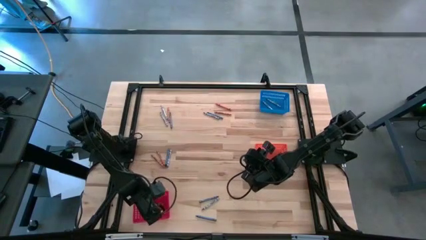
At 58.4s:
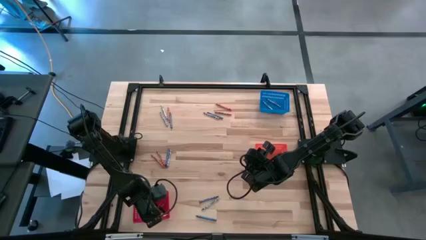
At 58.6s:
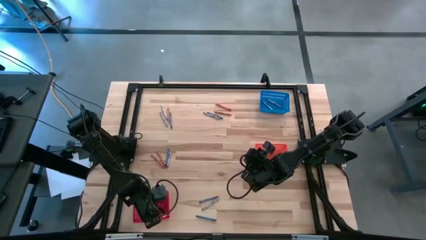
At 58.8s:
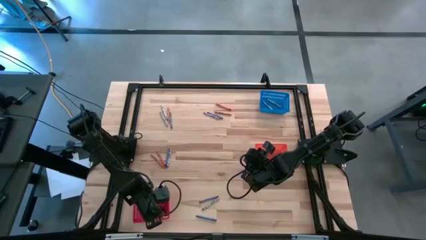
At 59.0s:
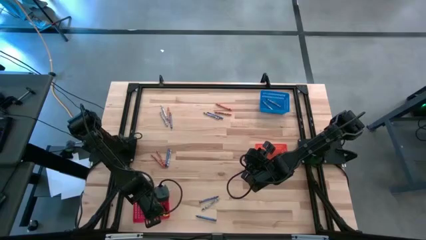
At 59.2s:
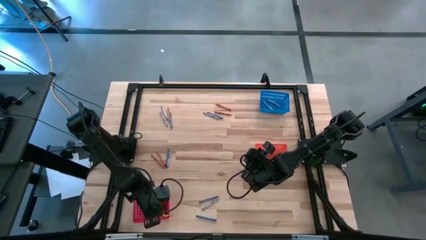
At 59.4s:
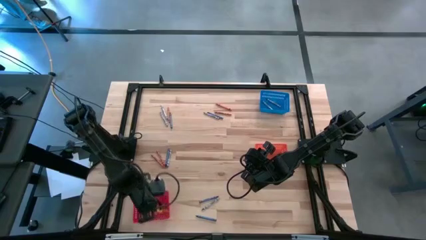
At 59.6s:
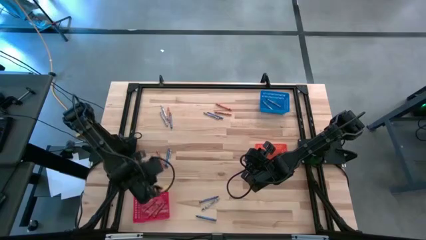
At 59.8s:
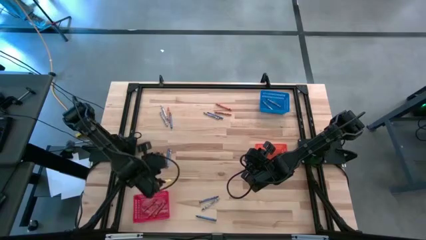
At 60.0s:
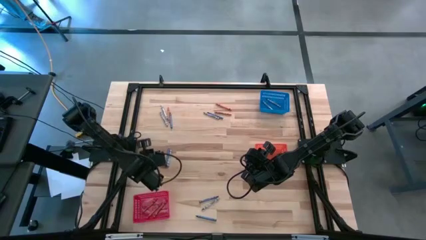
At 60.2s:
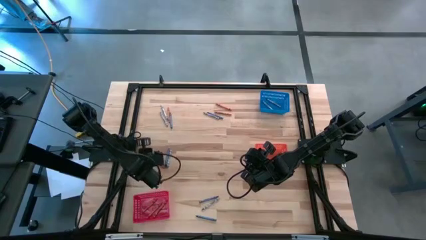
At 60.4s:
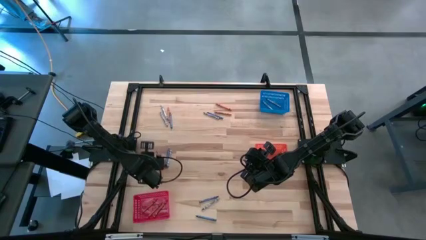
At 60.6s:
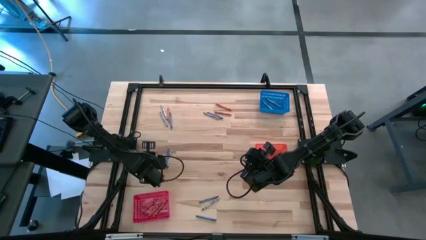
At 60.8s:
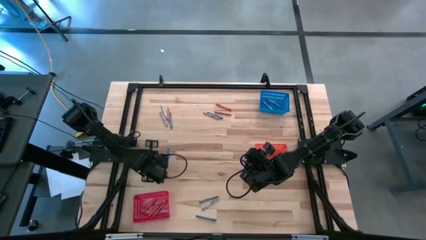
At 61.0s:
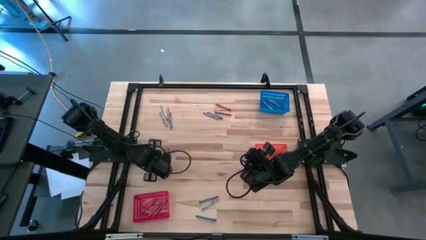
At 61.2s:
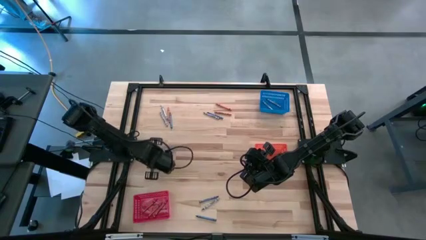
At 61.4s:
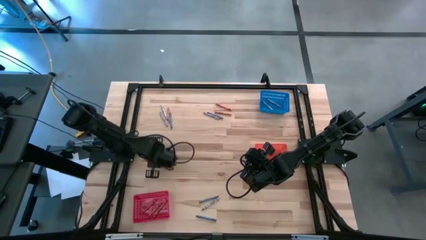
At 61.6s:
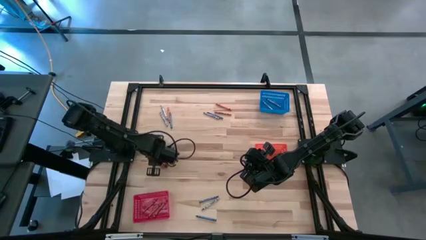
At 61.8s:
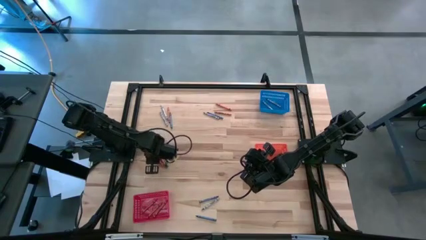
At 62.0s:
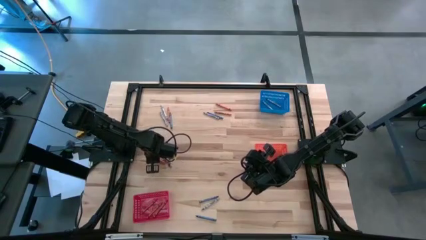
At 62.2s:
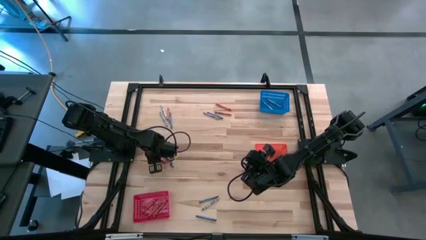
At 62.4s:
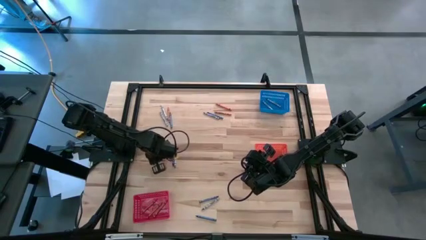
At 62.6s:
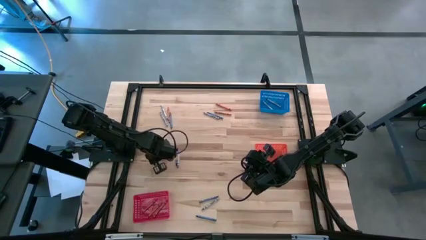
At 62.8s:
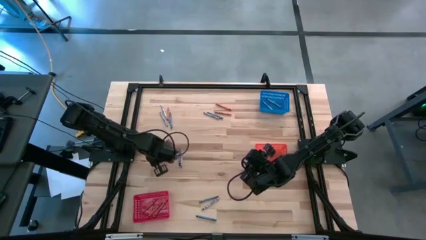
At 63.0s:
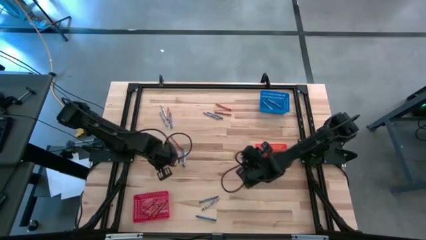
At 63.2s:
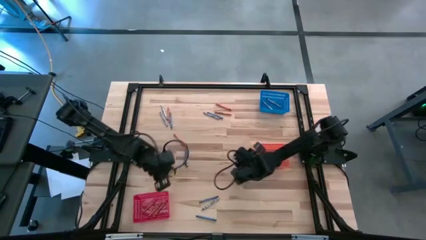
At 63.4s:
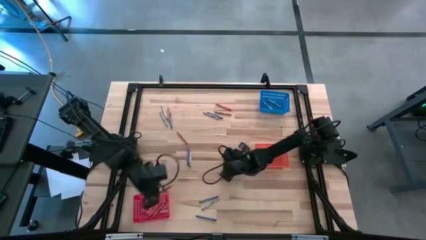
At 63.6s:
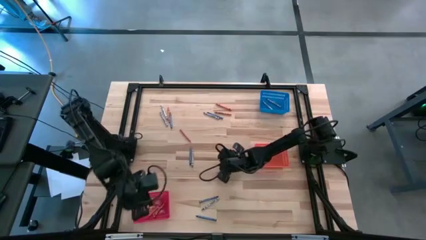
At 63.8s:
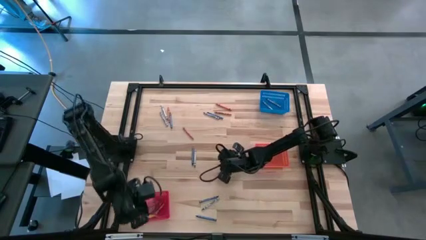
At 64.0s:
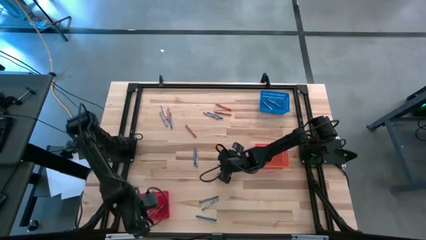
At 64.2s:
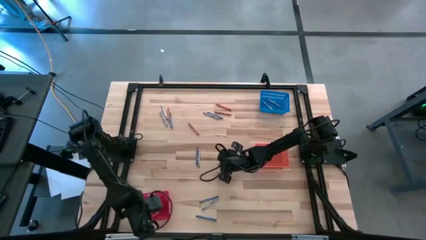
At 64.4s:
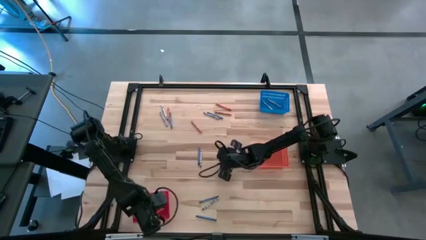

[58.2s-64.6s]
Task: Sort crayons
Put the orange crayon into the red bin

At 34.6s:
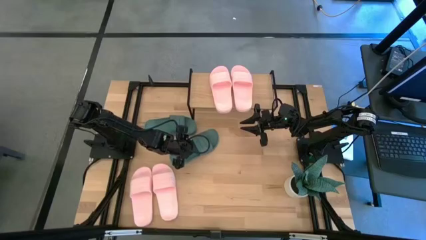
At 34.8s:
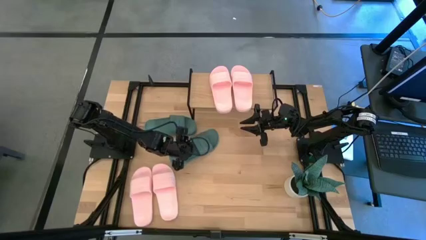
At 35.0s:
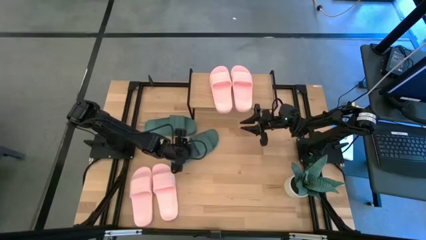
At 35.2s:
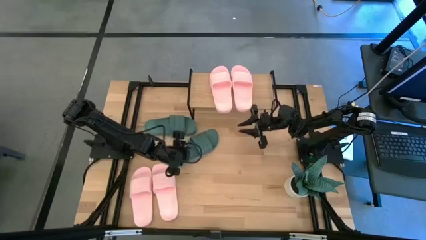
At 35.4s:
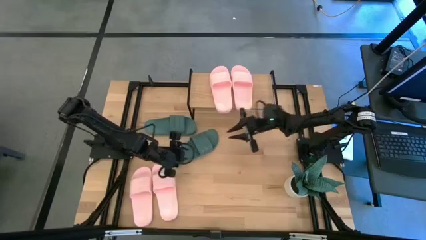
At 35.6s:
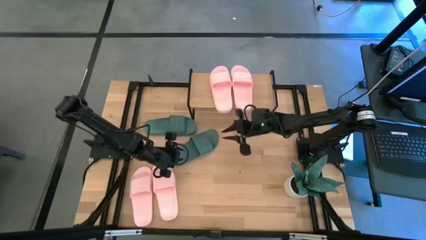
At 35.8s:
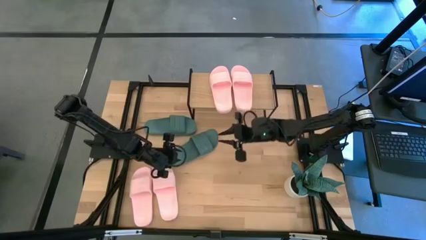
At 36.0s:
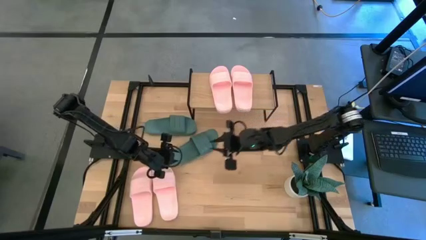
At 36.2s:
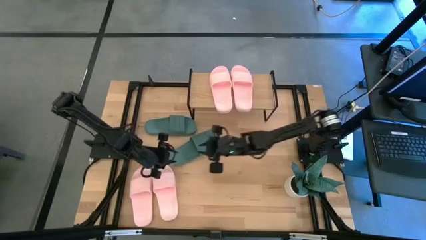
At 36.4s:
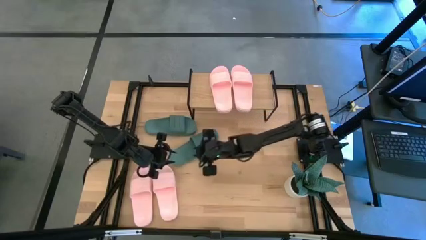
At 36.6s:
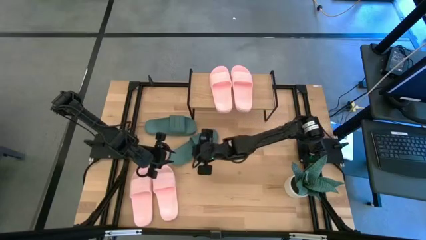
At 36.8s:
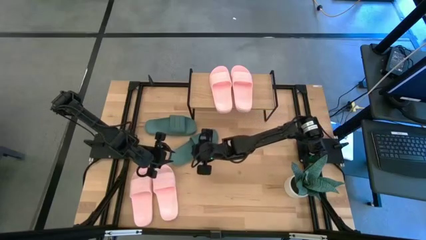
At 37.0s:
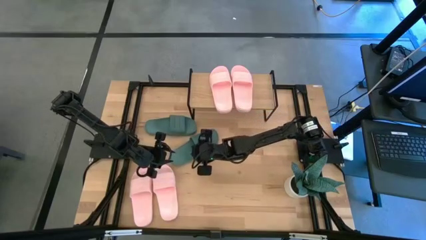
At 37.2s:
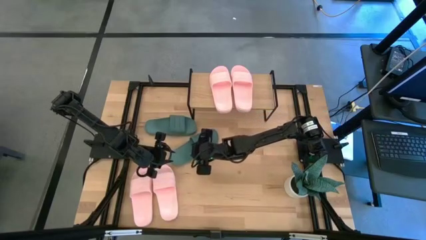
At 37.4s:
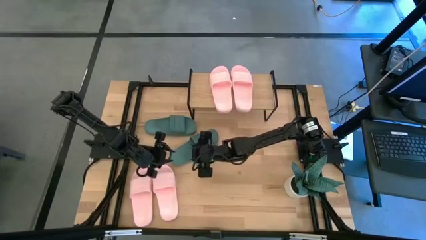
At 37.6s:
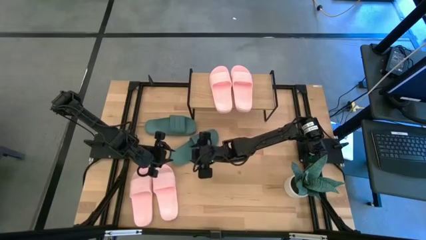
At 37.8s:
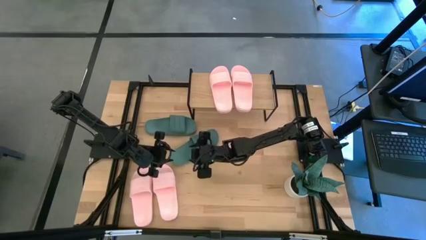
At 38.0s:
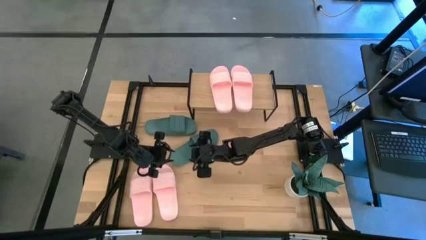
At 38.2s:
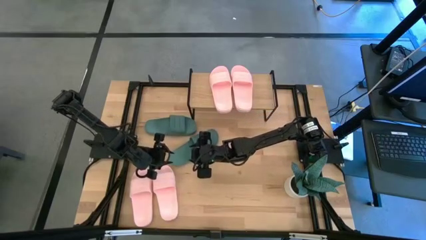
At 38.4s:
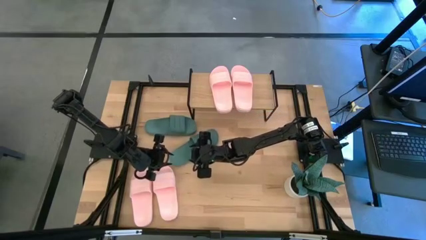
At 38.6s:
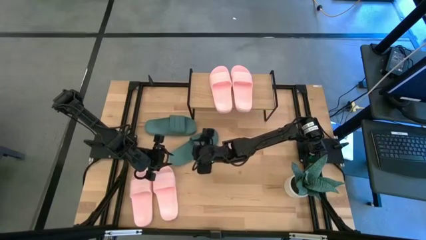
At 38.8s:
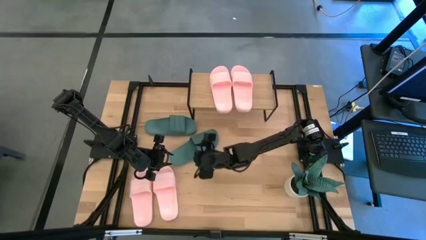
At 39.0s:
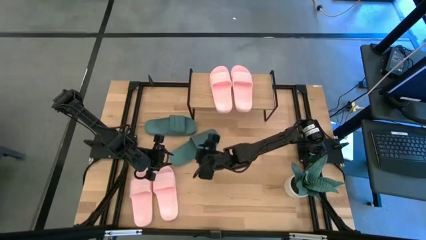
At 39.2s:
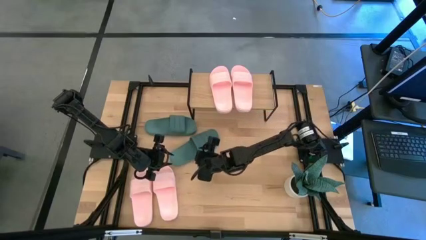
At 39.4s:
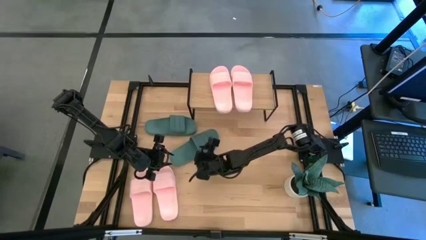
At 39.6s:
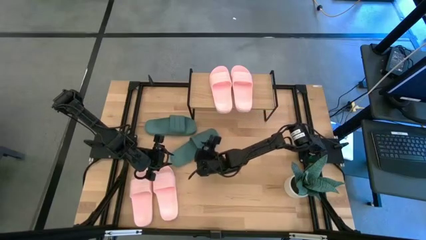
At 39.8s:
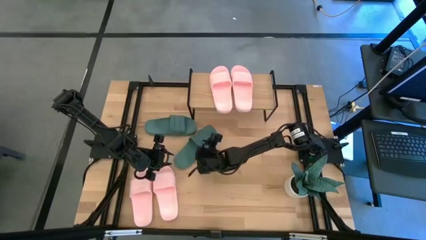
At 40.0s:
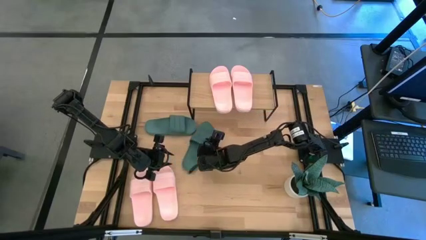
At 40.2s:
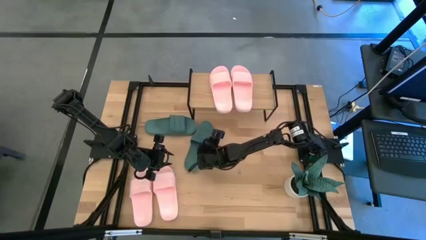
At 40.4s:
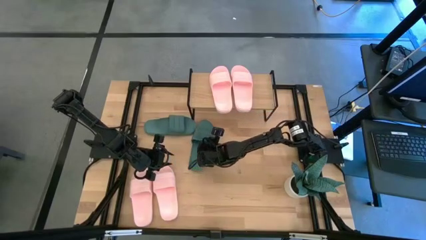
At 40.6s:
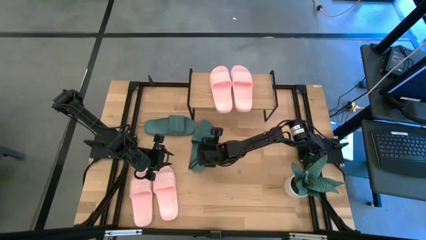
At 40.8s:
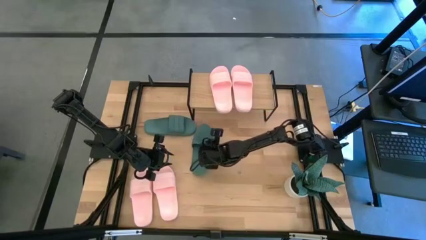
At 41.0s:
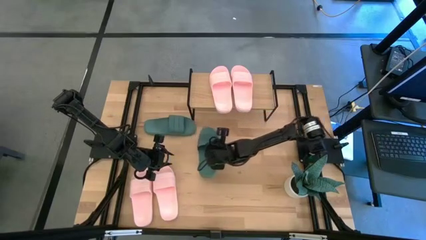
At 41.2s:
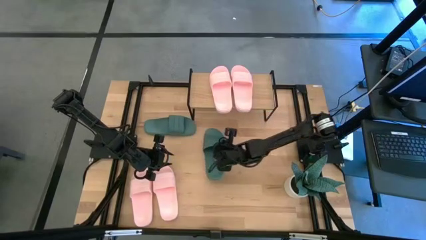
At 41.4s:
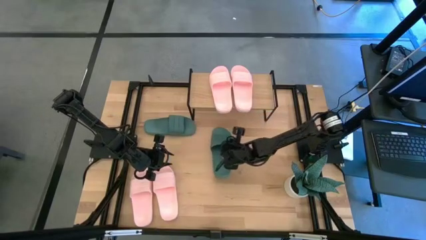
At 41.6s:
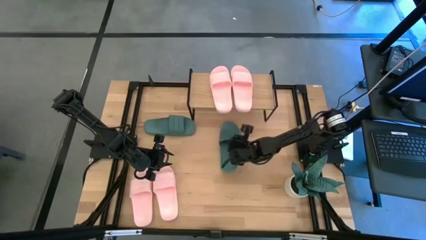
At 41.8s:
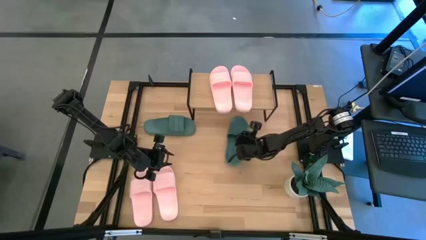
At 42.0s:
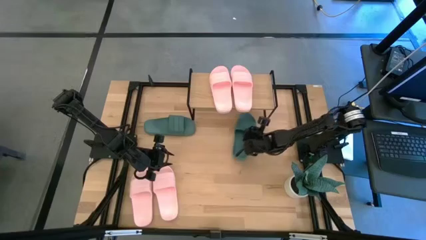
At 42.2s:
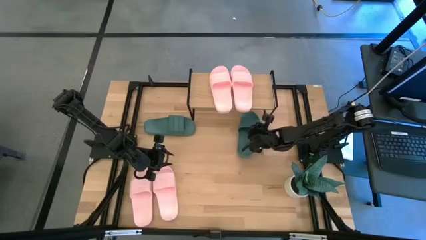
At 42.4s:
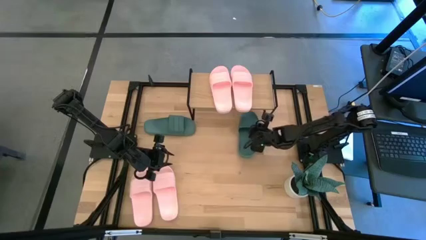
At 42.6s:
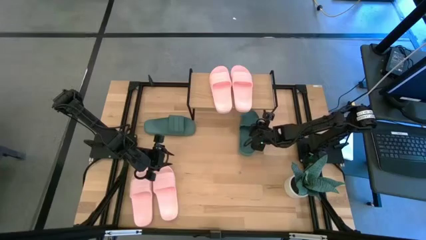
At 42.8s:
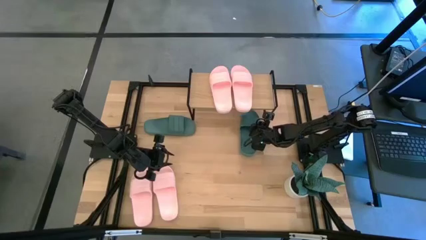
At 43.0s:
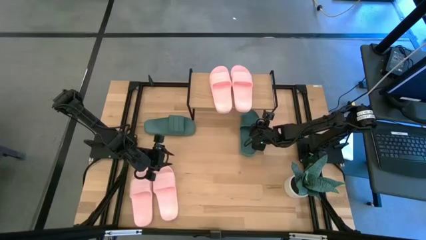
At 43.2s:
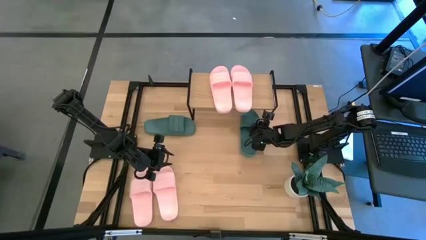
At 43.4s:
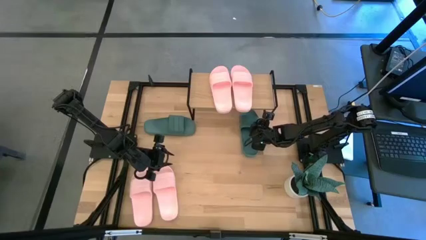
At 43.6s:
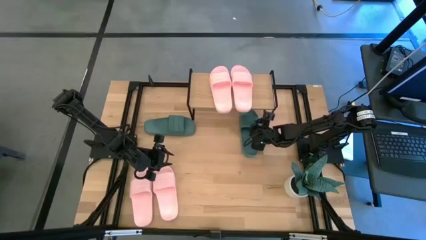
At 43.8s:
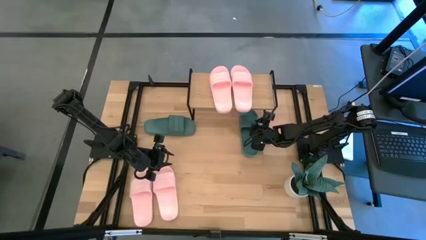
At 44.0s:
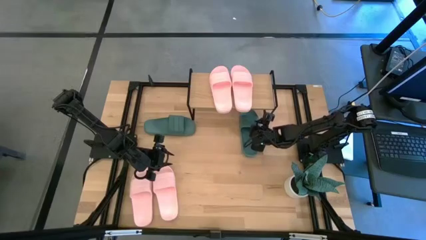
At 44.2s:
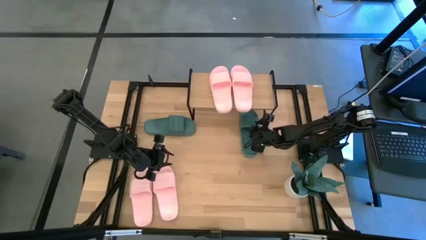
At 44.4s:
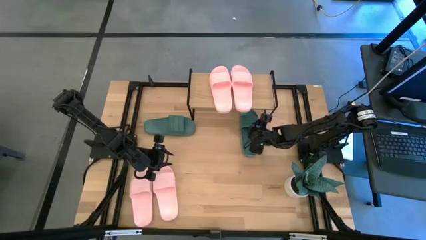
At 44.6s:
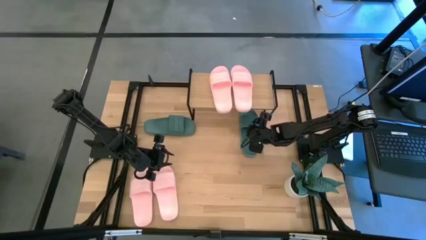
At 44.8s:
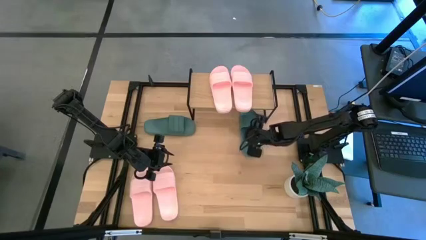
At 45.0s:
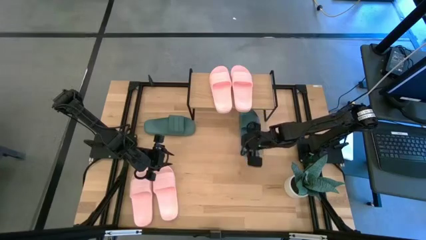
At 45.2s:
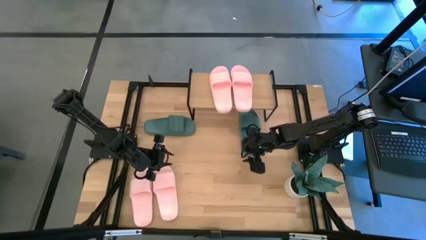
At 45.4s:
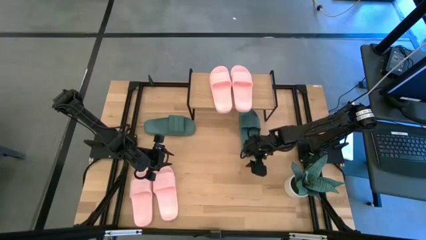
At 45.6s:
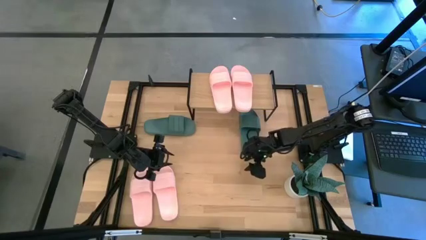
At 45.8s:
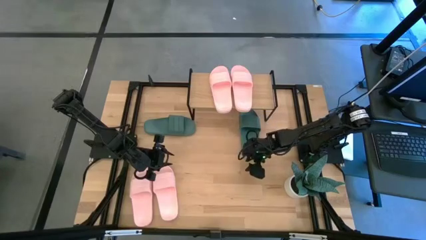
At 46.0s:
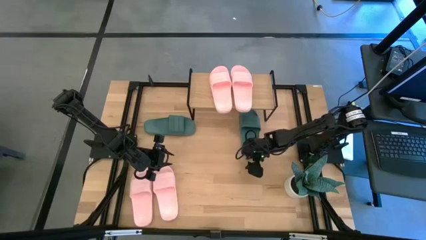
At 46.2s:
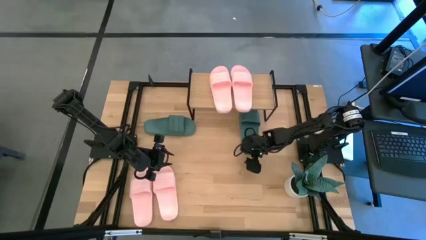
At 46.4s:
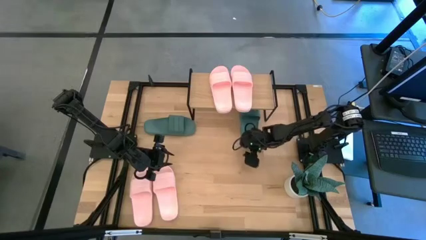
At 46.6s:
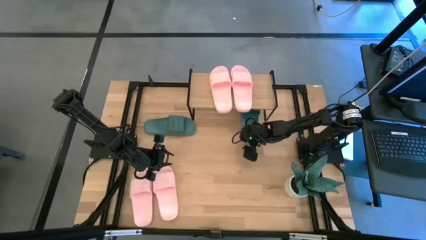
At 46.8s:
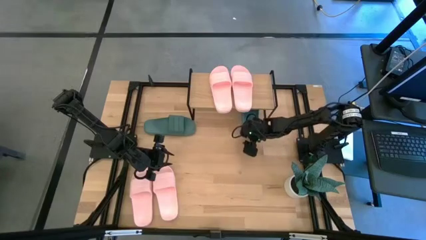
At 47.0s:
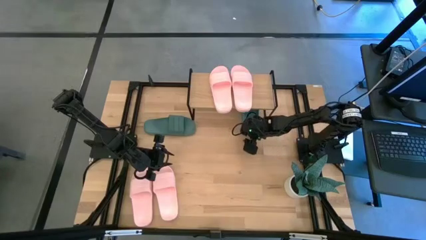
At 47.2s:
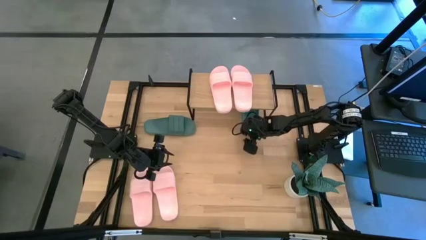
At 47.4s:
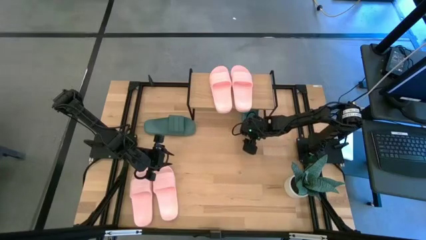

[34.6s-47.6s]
Task: Pick and place slides into the shelf
Put the green slipper under the shelf
